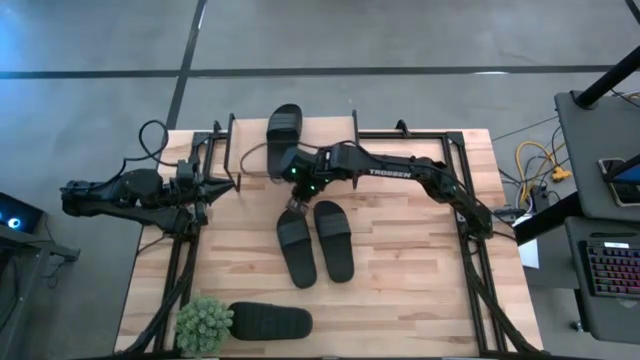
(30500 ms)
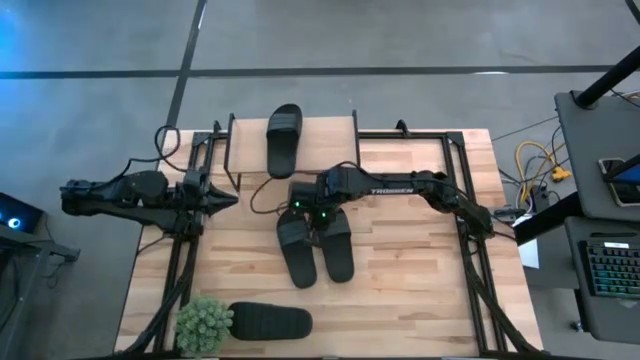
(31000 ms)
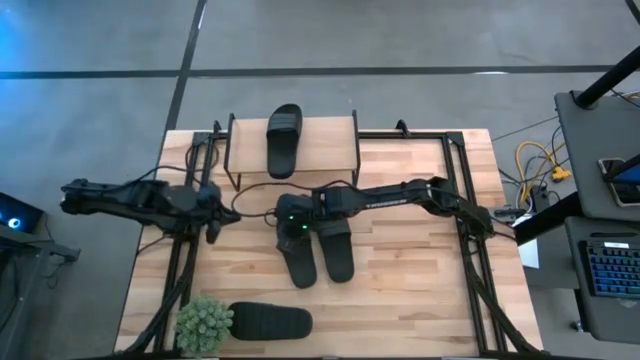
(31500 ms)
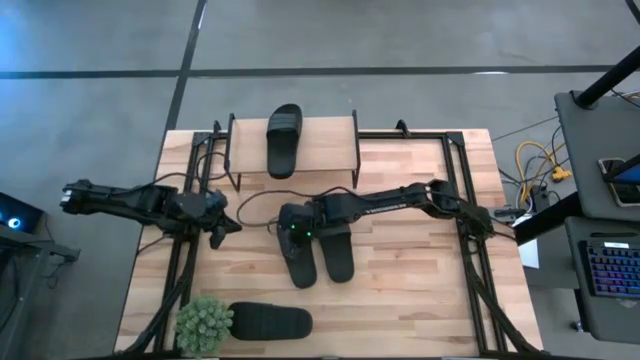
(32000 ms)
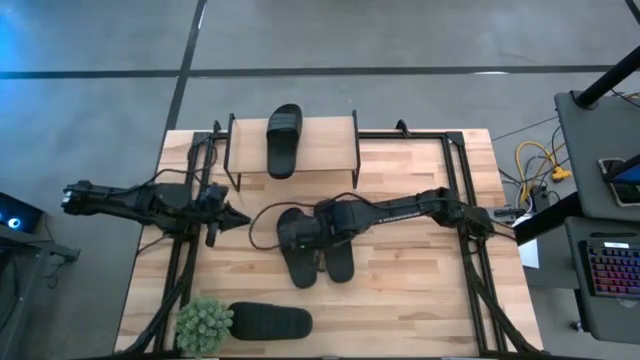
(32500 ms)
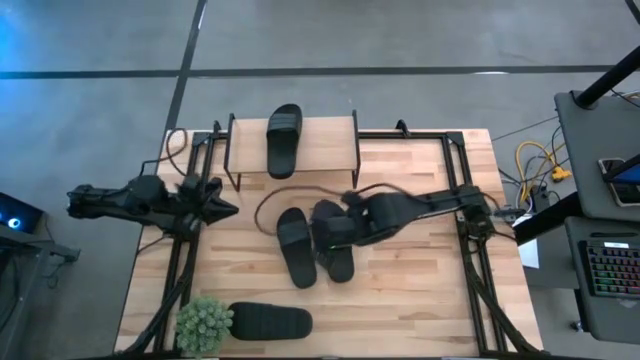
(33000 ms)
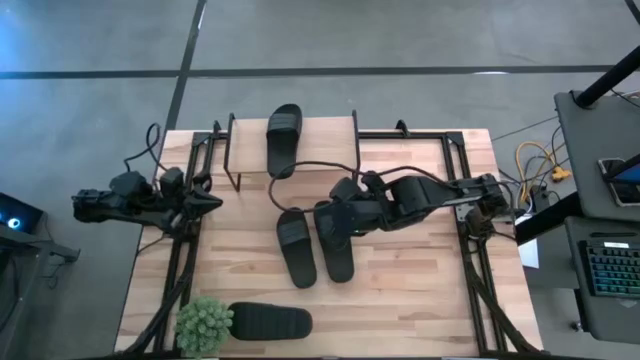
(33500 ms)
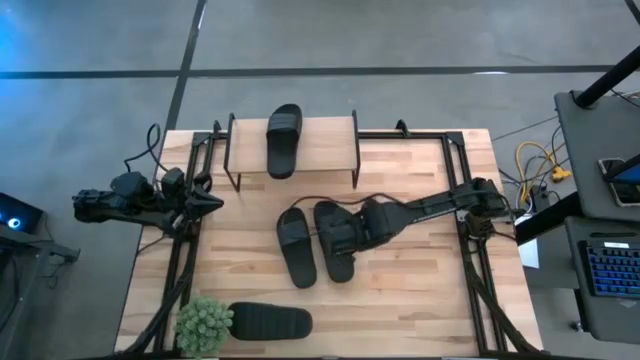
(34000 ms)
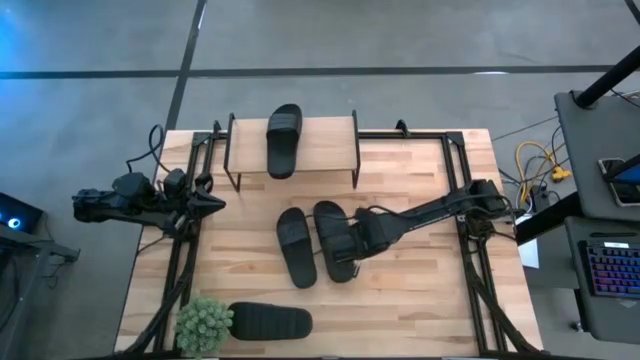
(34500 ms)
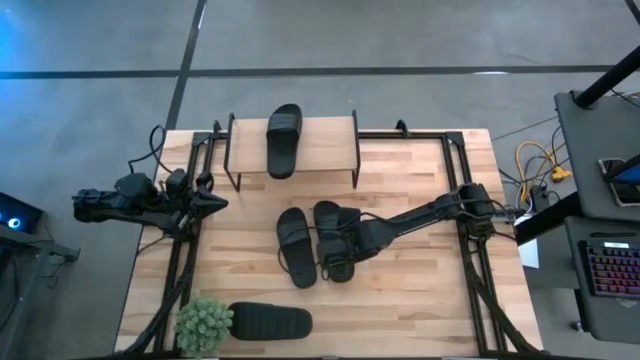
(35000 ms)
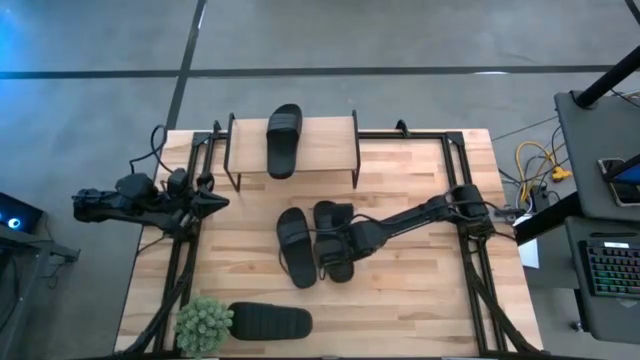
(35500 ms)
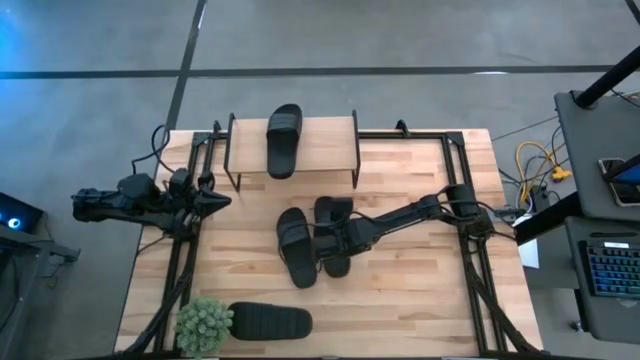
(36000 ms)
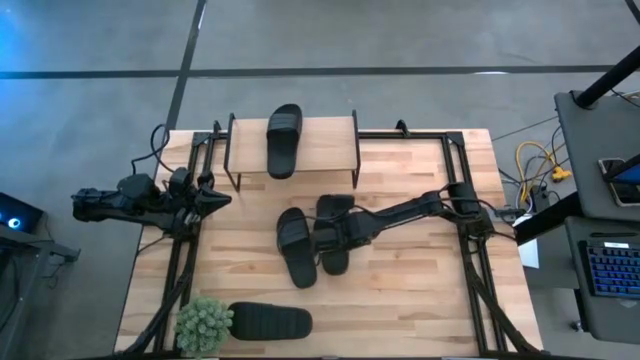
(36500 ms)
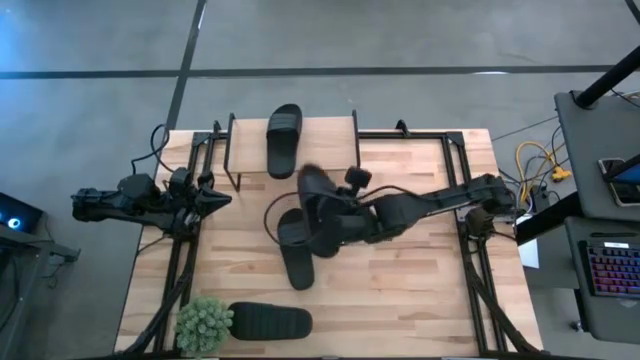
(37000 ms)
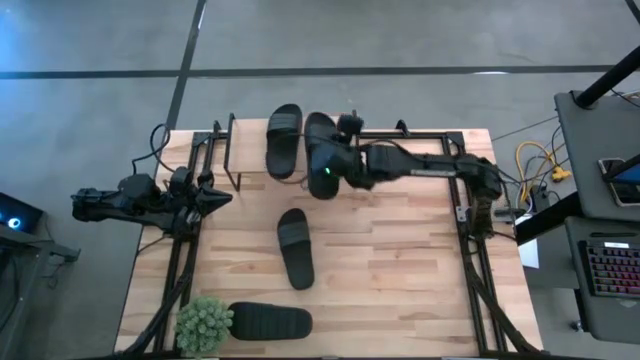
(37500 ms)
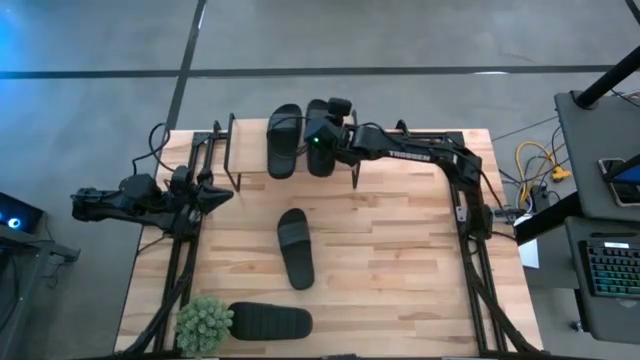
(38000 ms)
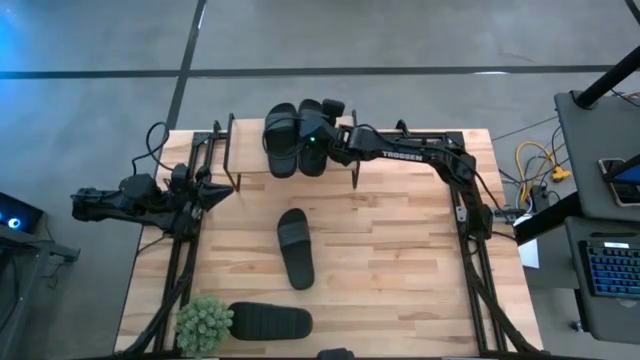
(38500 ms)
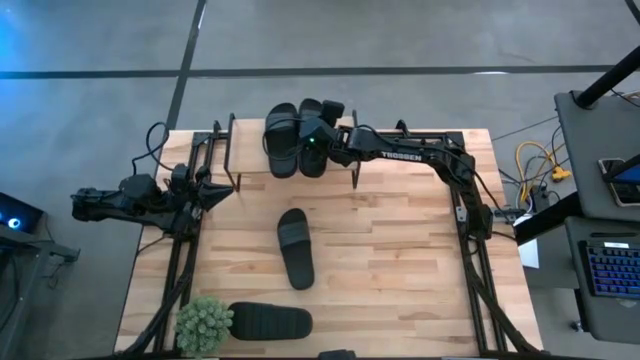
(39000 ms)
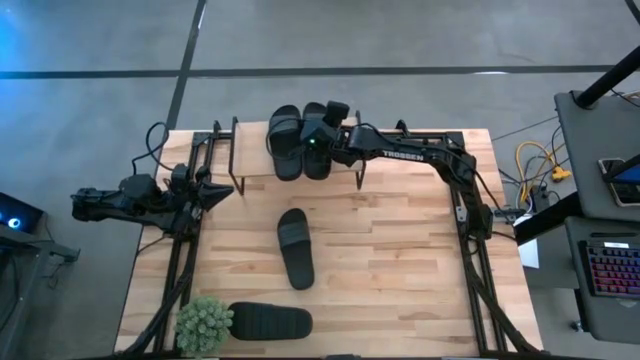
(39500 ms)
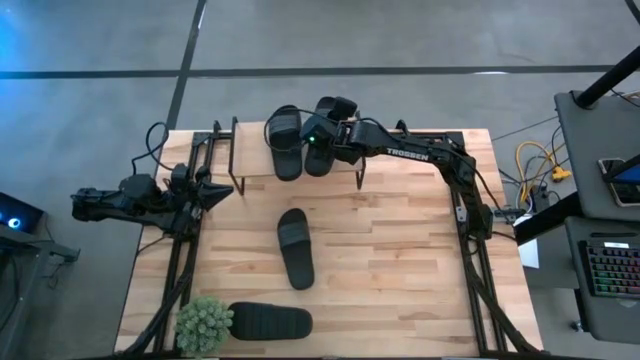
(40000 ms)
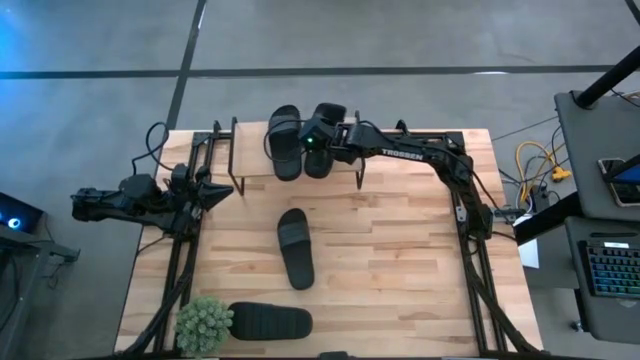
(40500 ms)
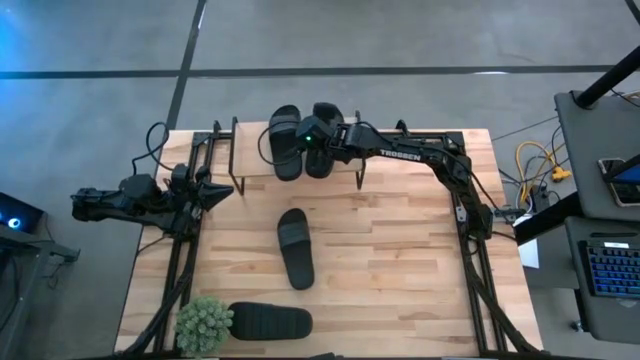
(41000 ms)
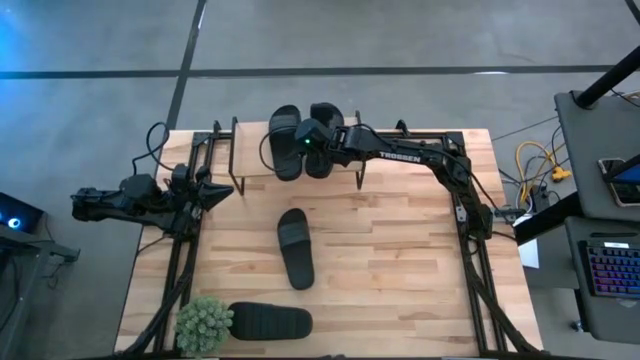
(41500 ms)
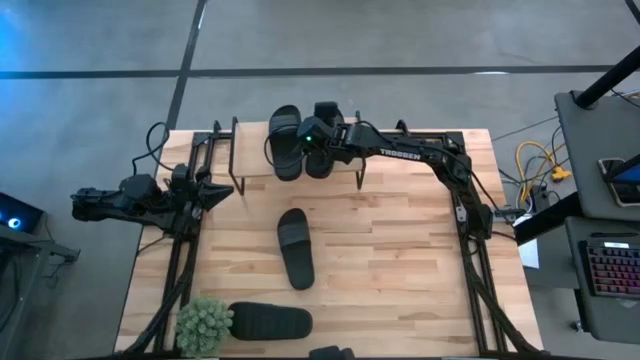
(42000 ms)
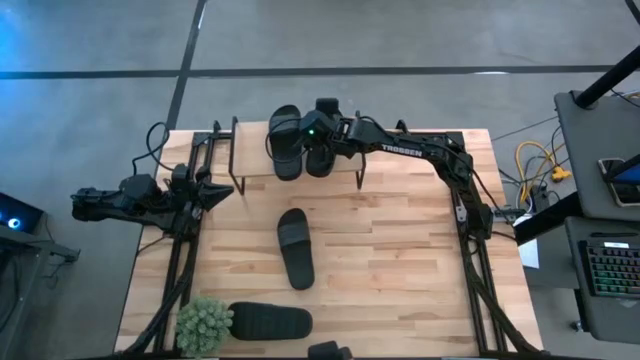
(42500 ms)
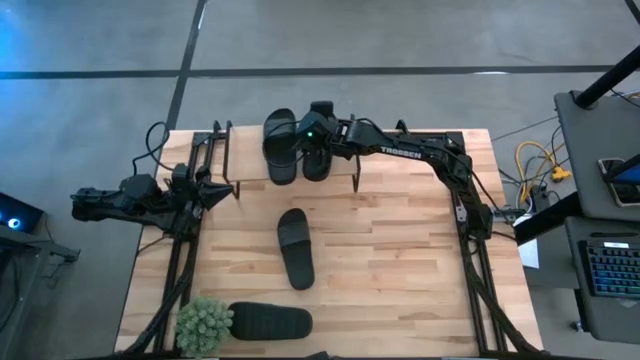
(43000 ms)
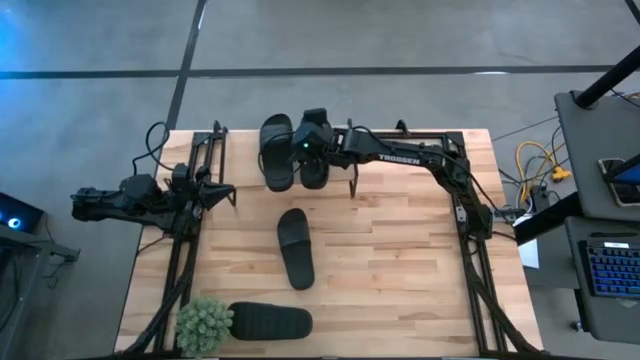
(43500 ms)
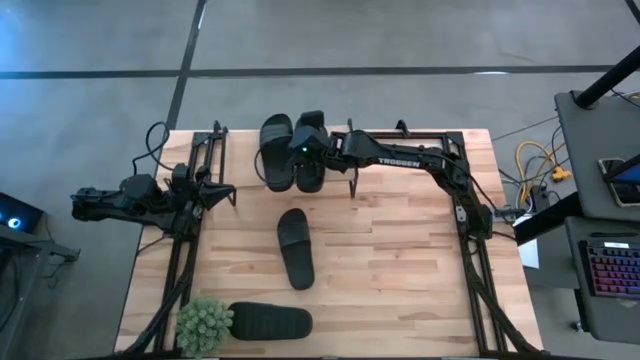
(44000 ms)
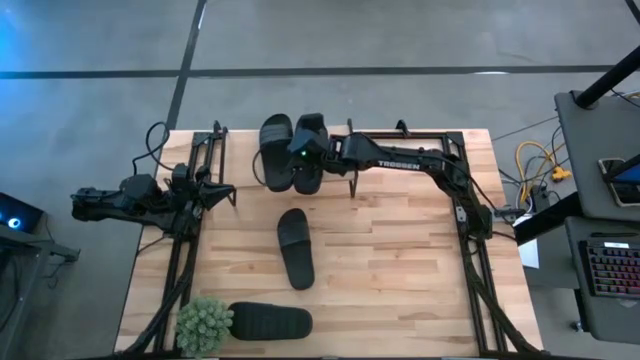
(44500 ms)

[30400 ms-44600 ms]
Task: Pick and place slides into the shelf
Put the black slide on the shelf

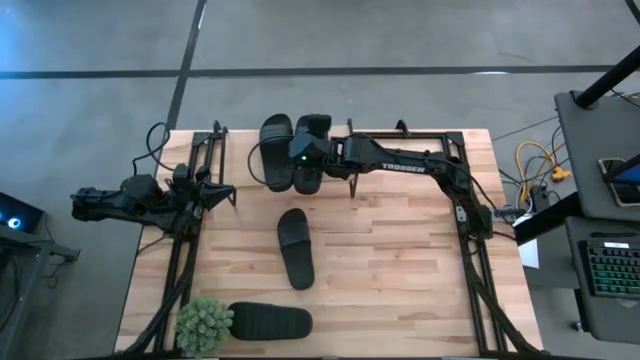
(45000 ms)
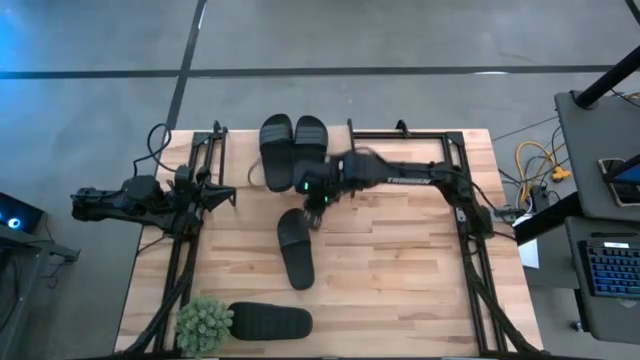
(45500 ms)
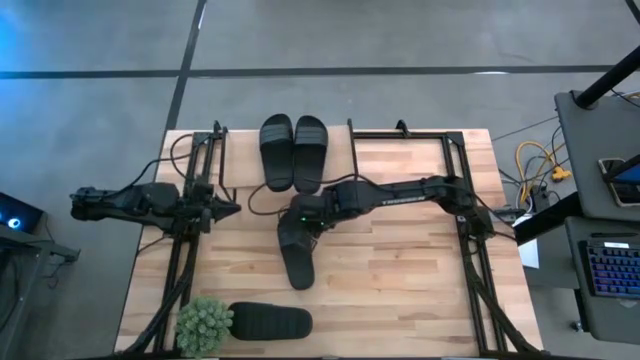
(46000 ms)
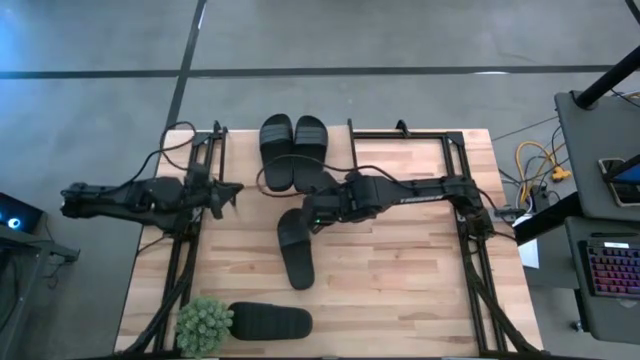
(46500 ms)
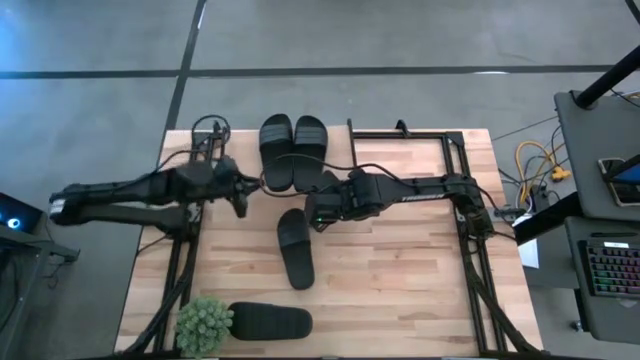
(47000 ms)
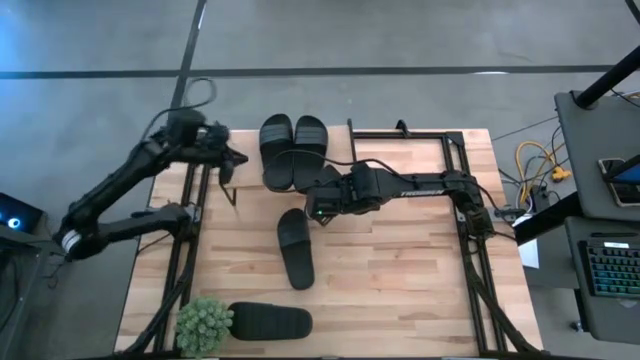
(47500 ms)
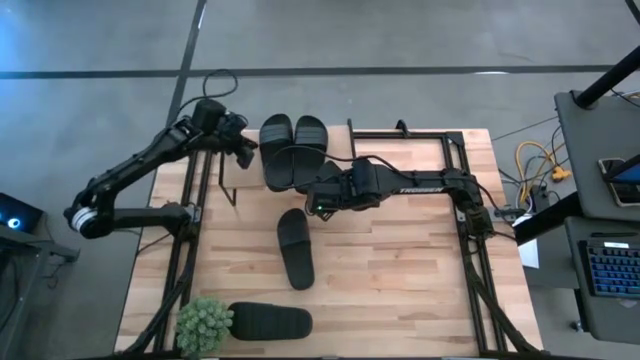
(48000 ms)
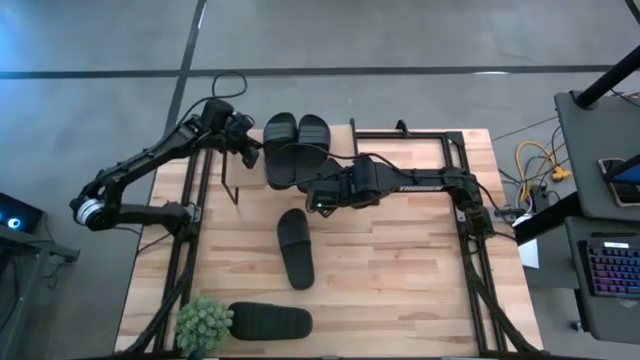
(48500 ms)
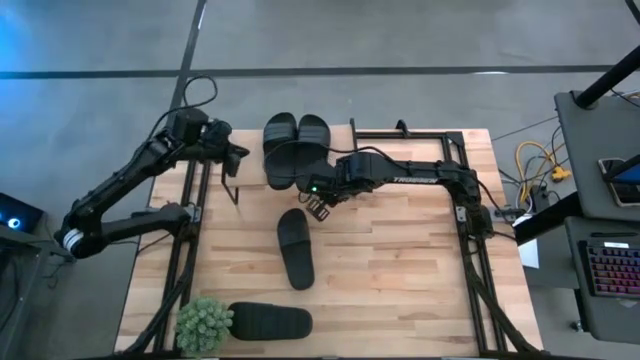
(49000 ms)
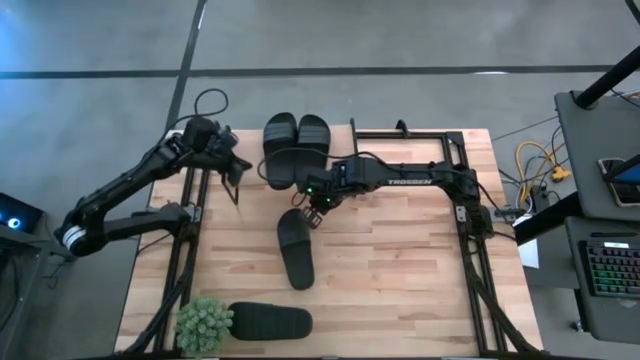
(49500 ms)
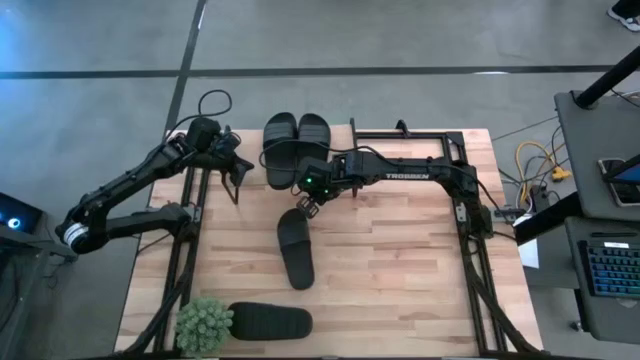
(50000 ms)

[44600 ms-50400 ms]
Adjust the black slides on the shelf

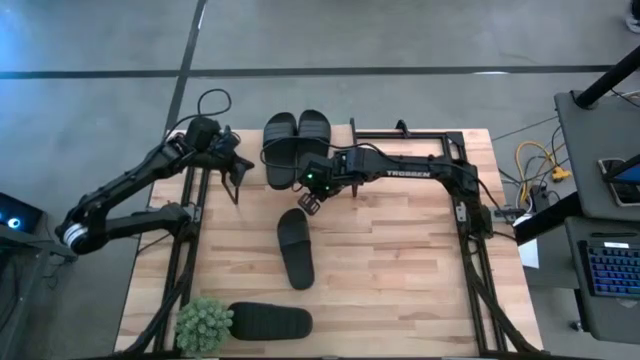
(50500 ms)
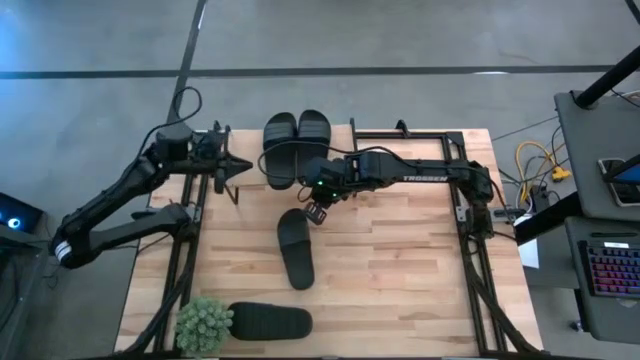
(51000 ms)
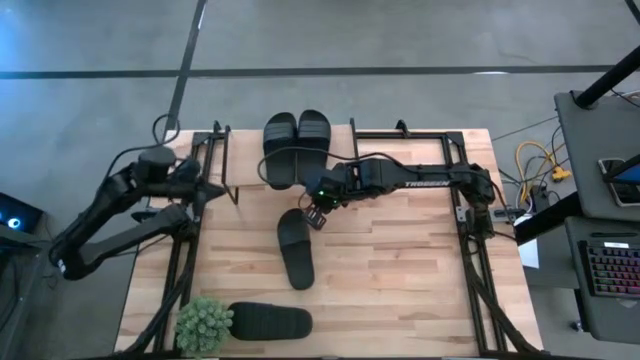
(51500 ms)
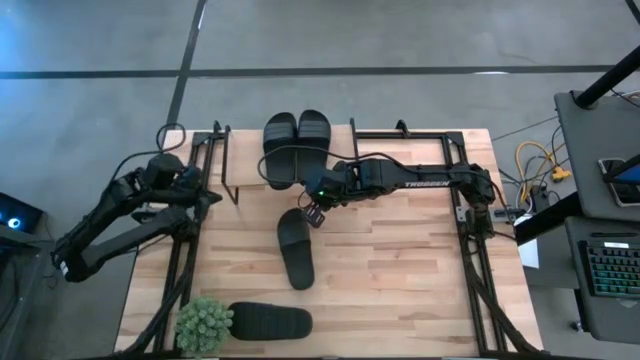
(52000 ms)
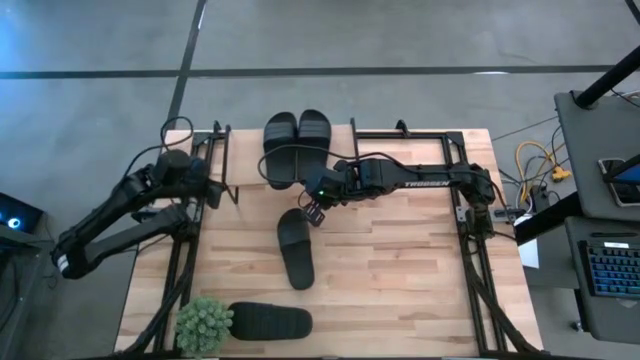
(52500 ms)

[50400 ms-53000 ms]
Adjust the shelf
